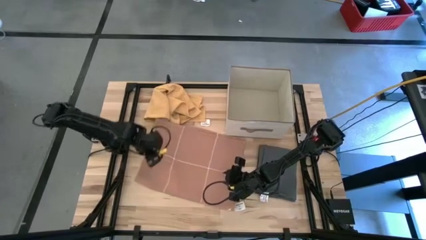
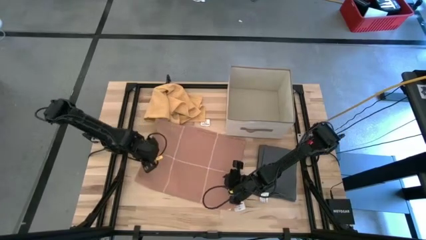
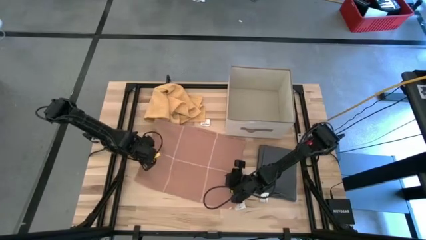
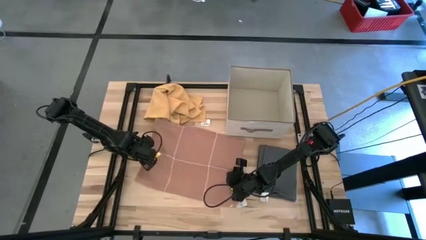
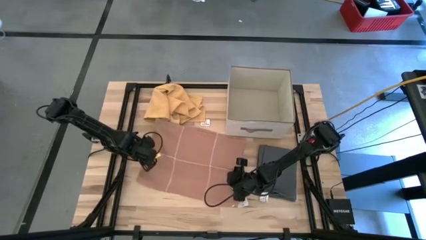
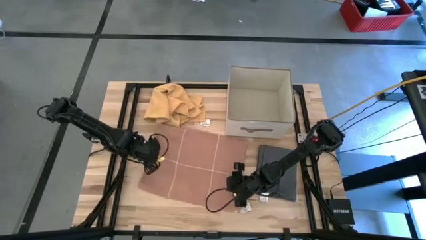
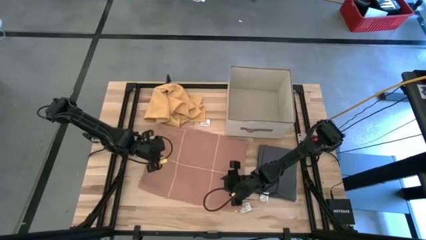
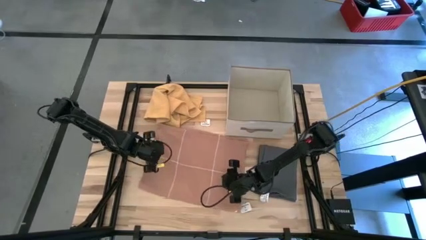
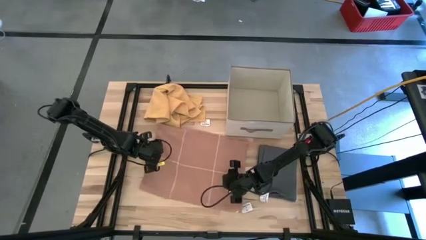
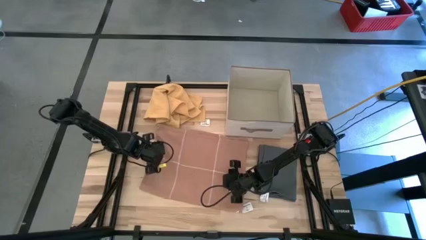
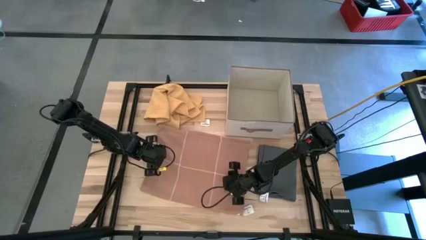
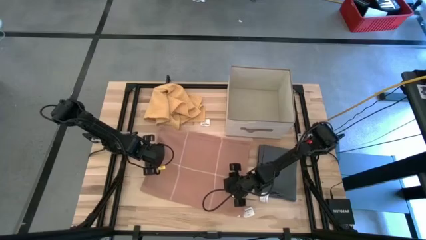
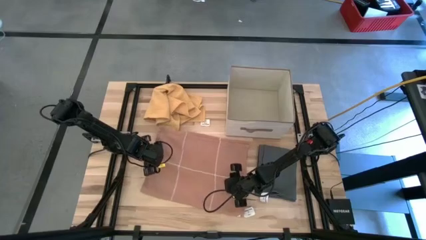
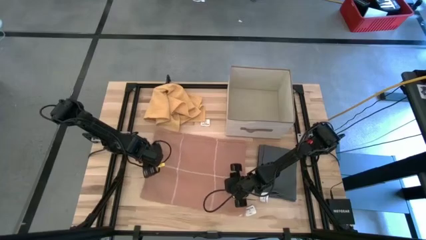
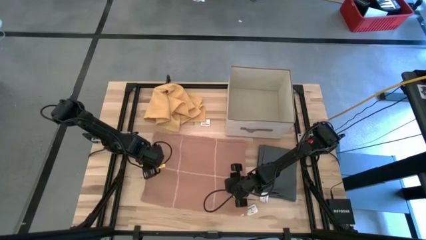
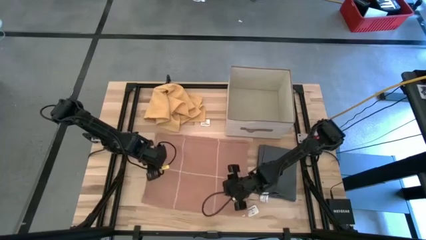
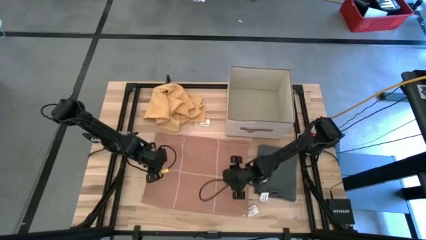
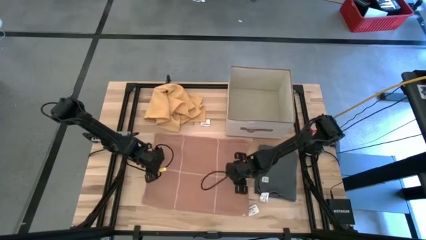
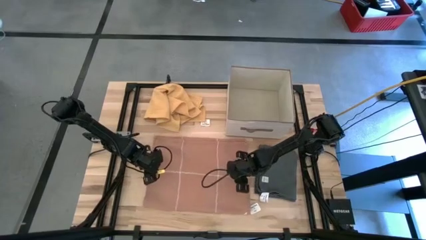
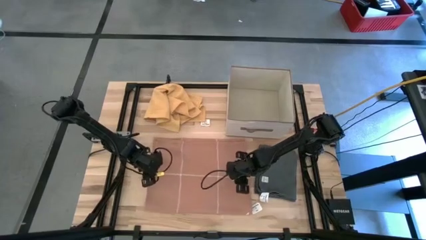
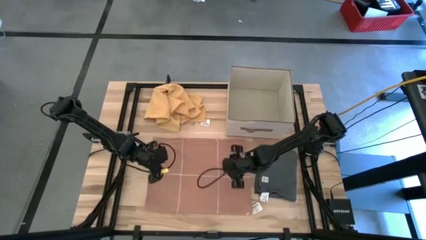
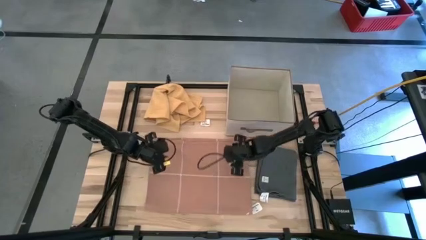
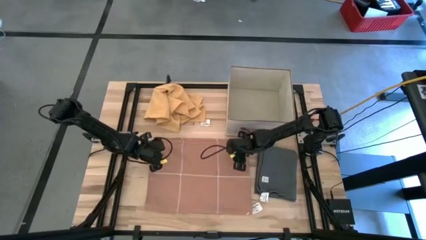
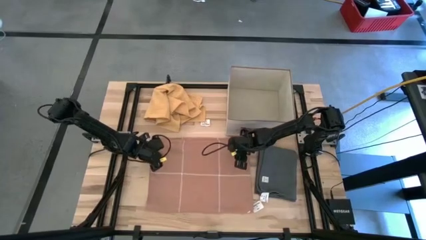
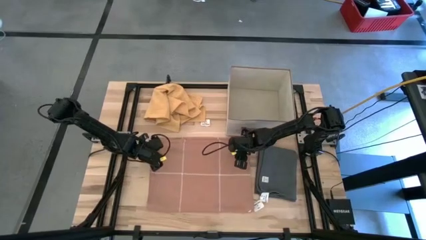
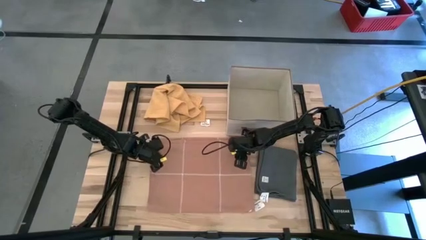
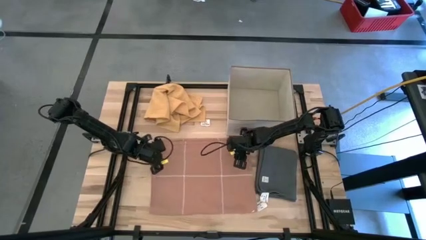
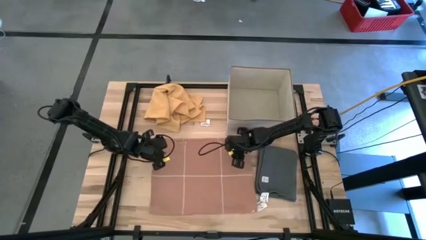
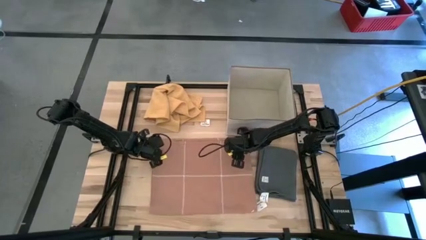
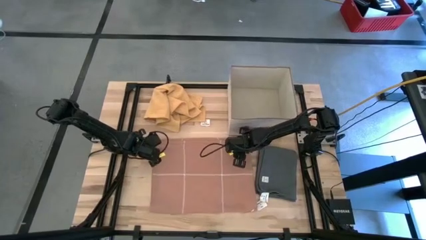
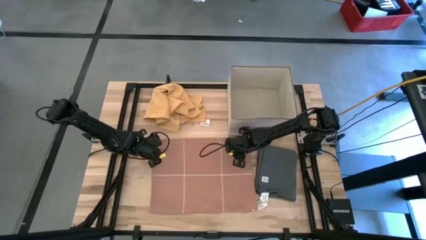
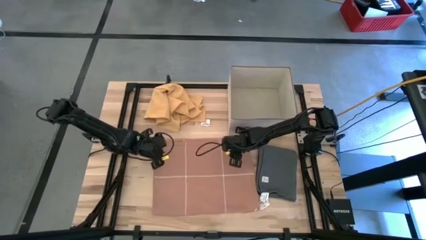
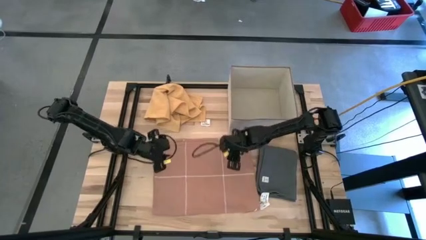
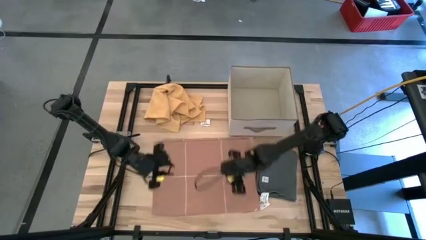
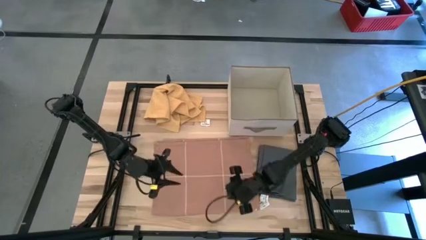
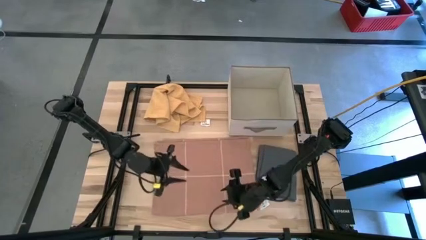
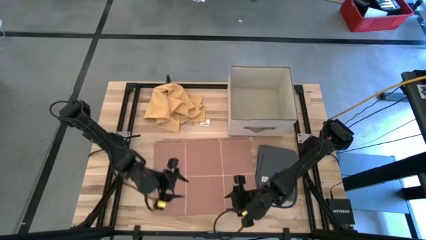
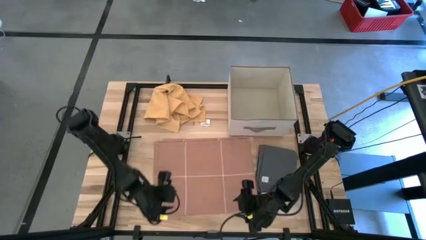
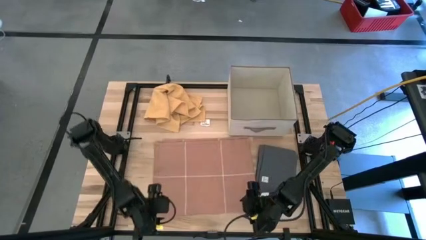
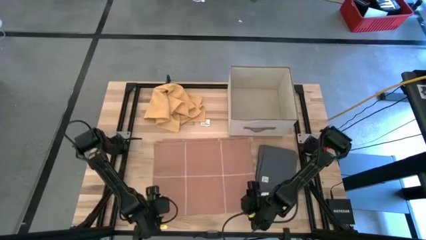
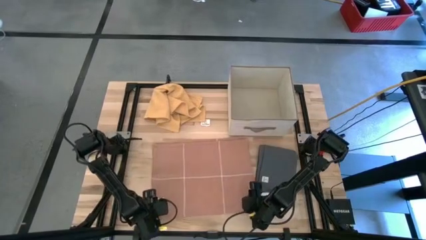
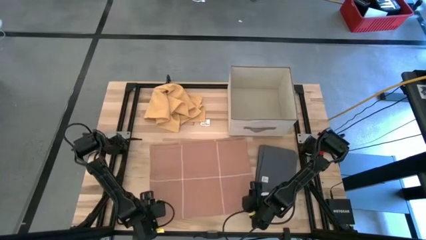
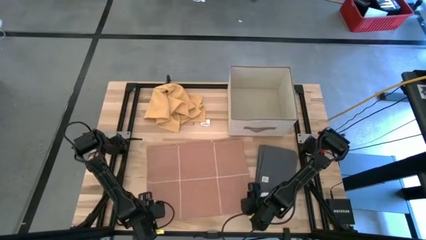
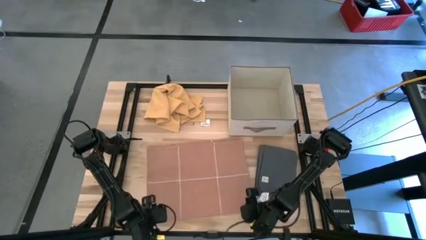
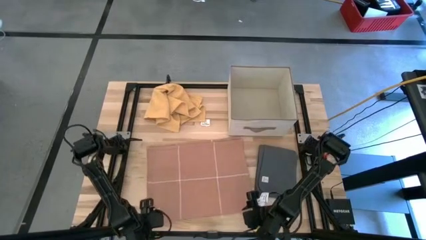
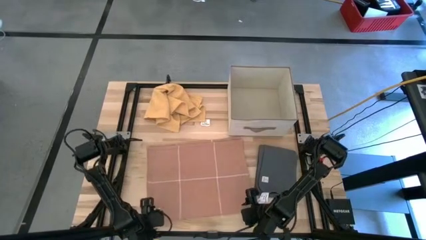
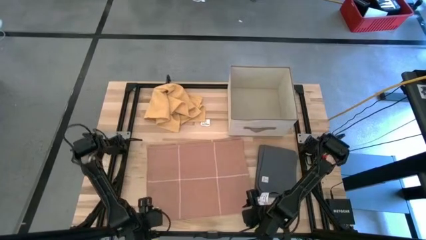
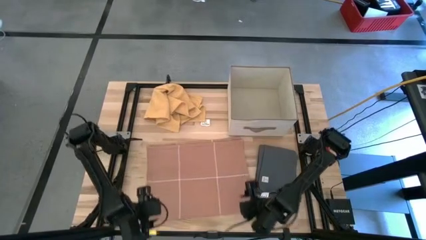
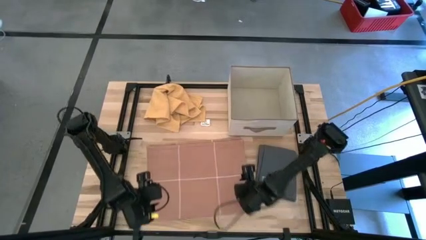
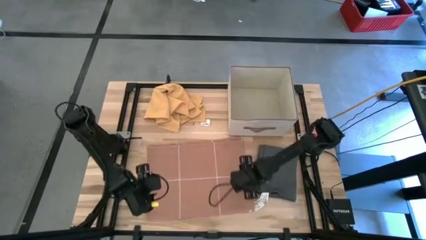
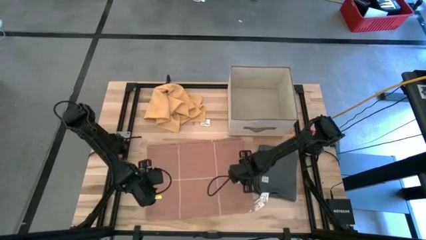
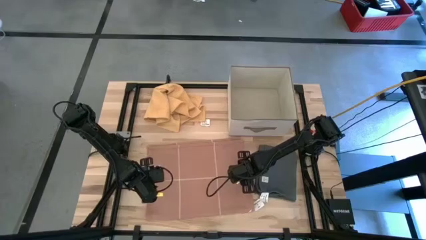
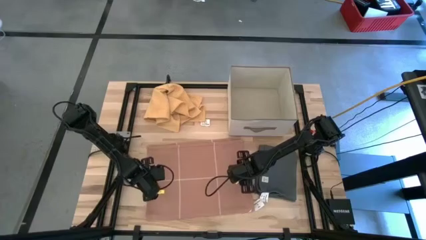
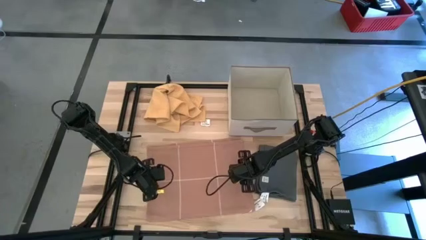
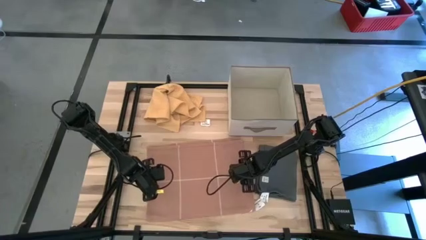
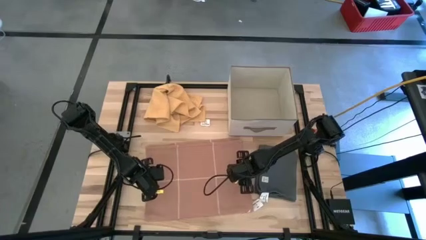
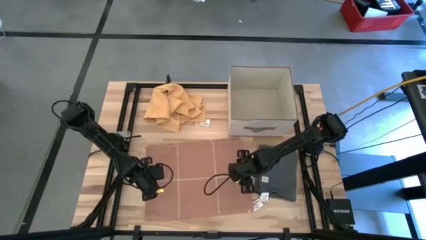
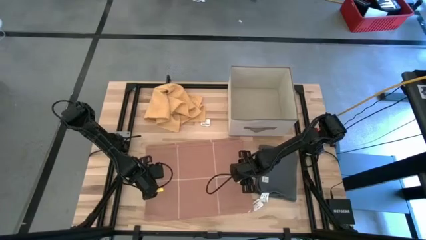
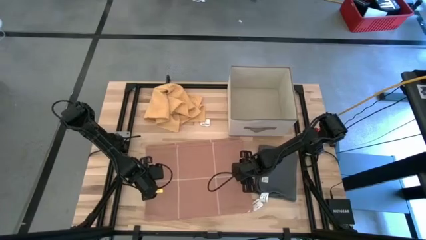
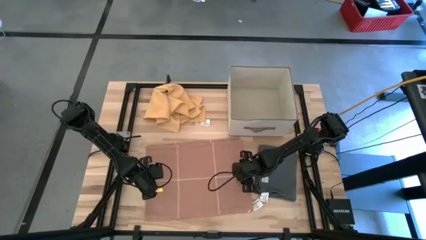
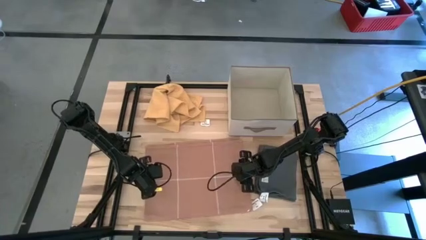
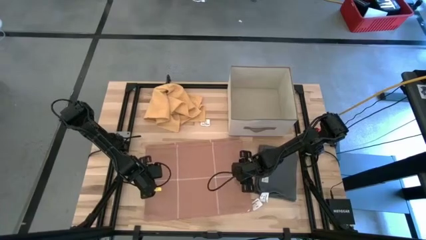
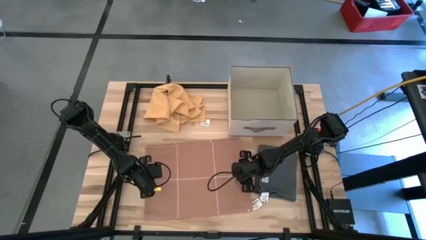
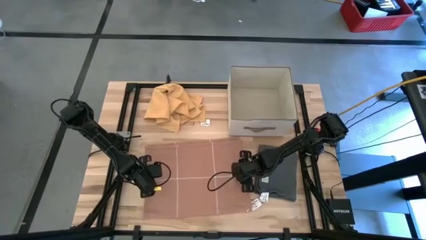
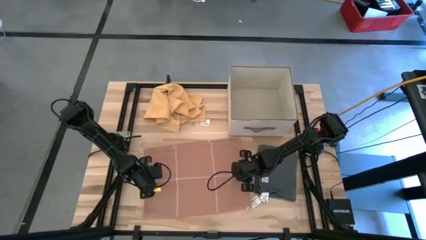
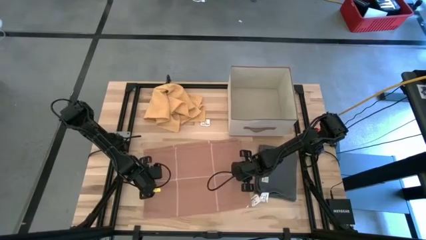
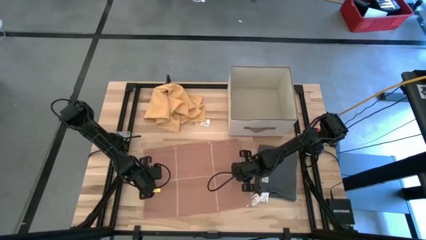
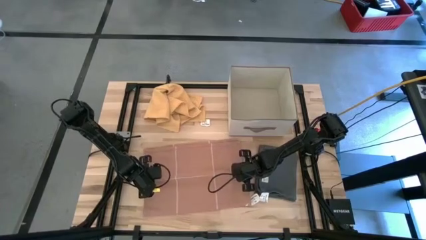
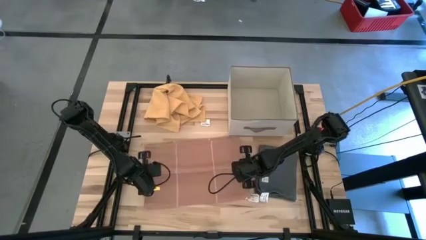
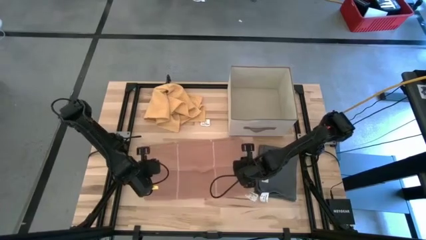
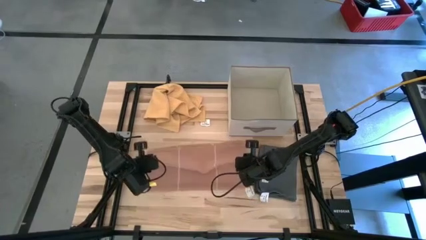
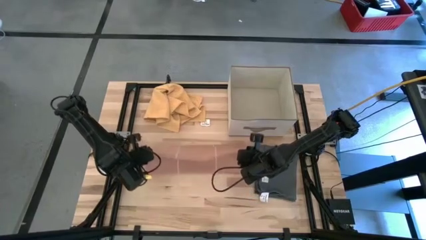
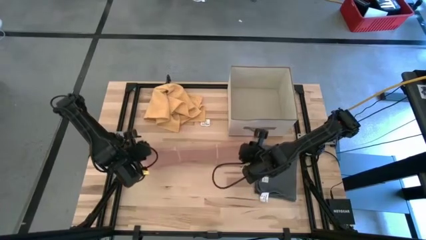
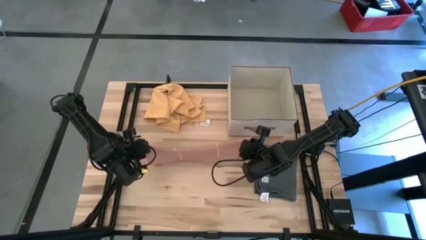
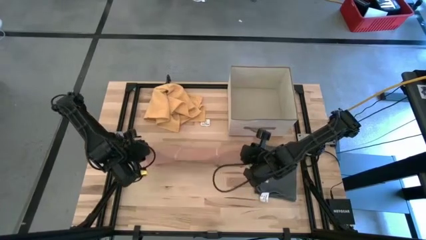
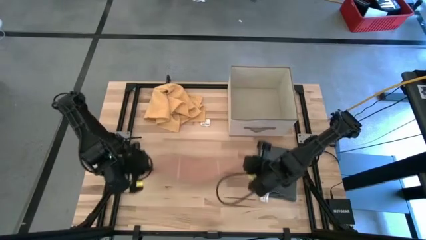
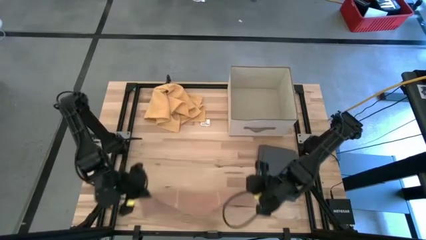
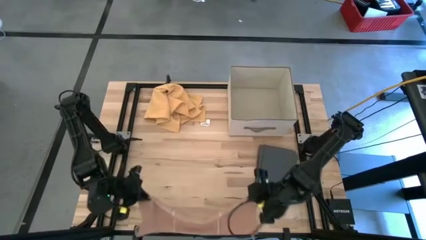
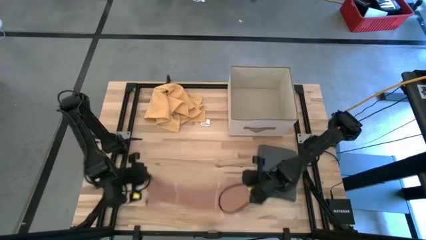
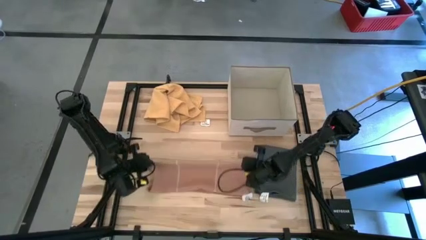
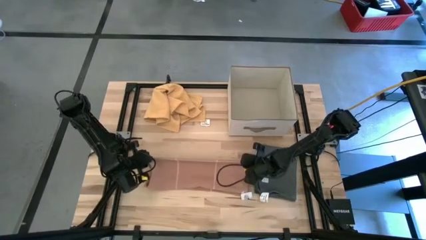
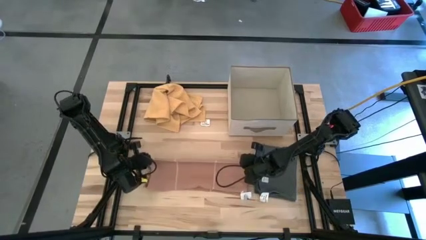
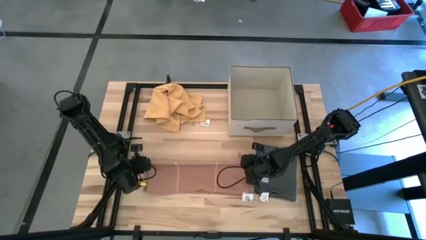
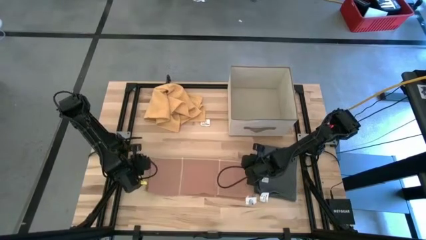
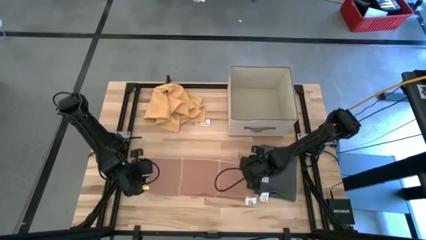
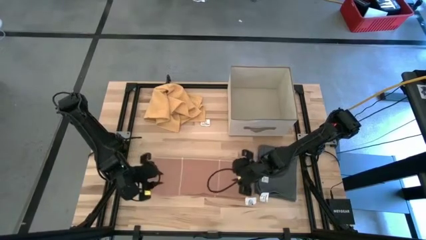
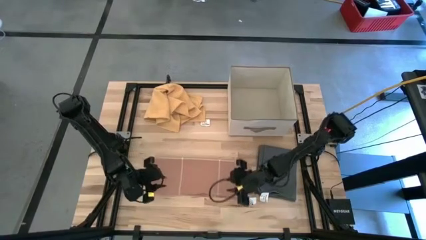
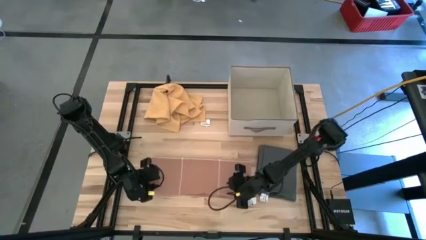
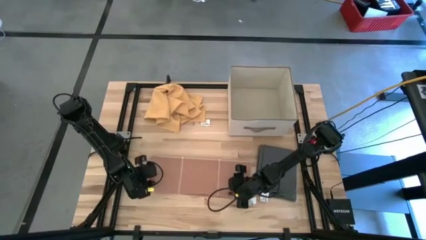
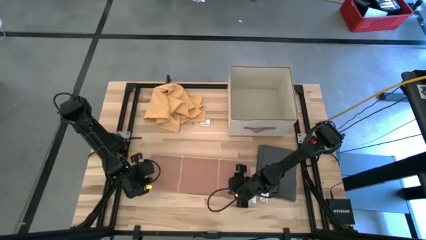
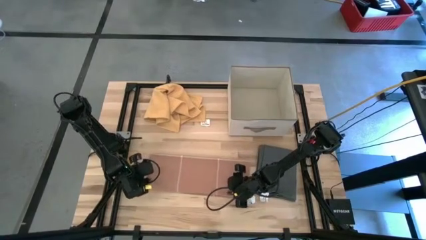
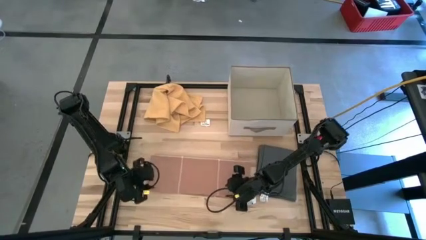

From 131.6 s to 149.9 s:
Task: Fold towel
Fold the light orange towel
